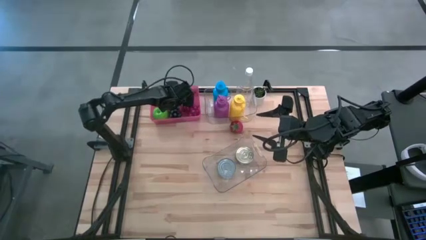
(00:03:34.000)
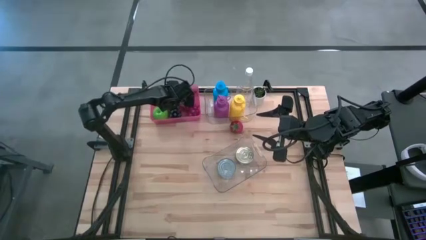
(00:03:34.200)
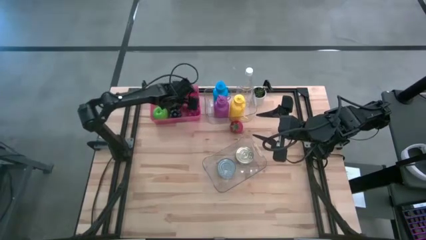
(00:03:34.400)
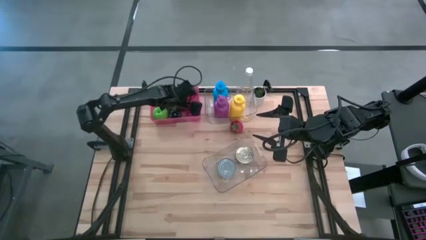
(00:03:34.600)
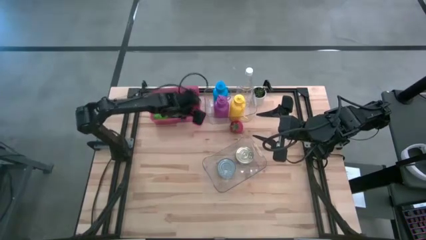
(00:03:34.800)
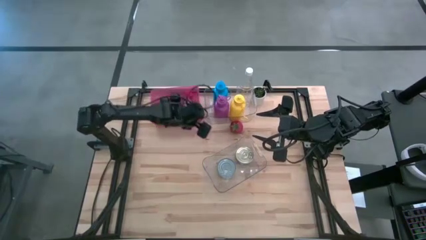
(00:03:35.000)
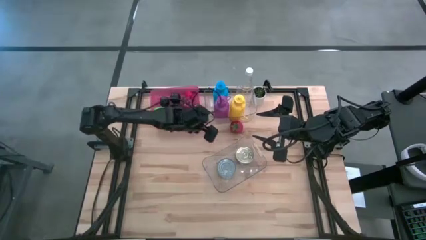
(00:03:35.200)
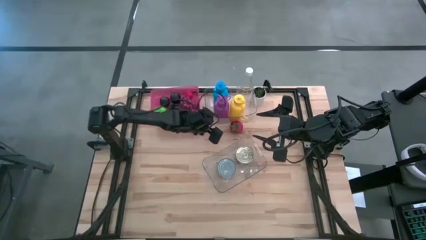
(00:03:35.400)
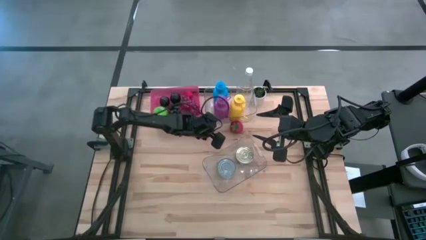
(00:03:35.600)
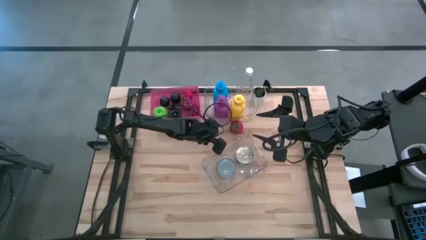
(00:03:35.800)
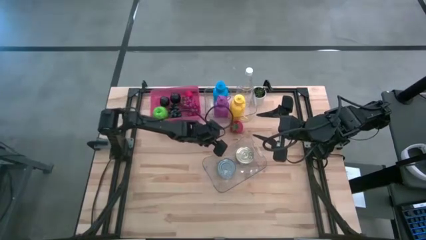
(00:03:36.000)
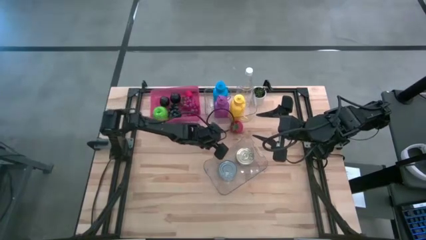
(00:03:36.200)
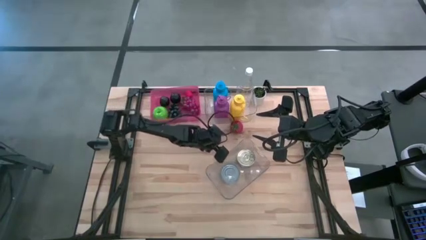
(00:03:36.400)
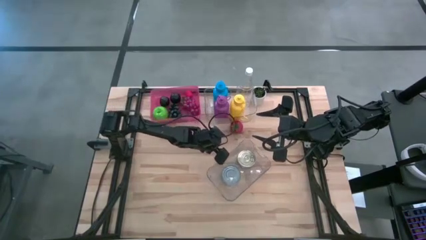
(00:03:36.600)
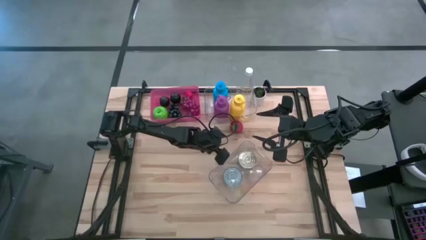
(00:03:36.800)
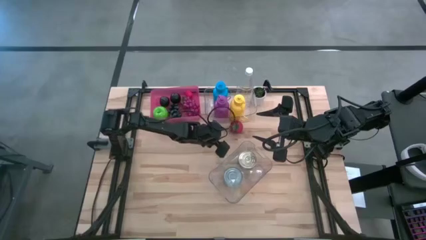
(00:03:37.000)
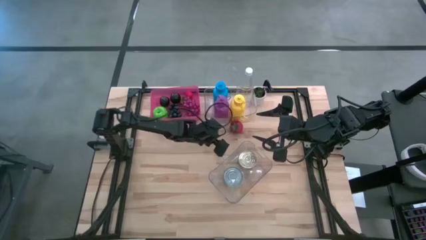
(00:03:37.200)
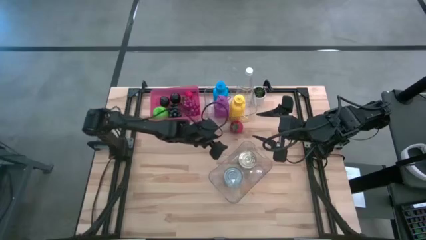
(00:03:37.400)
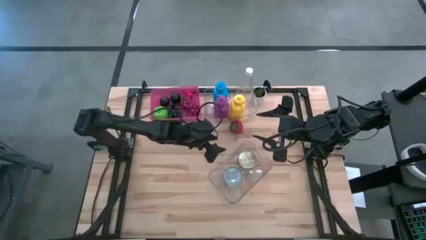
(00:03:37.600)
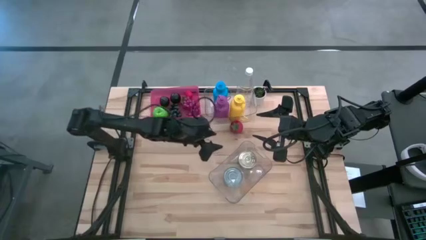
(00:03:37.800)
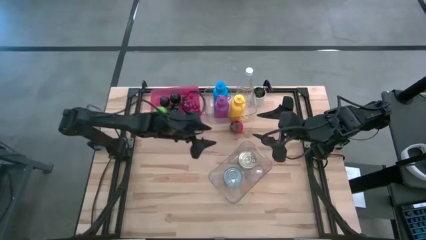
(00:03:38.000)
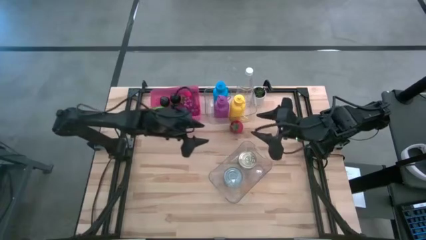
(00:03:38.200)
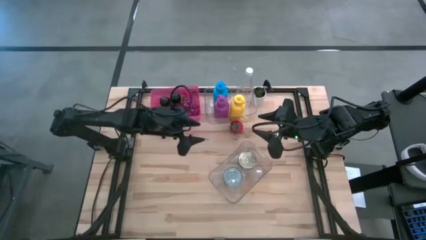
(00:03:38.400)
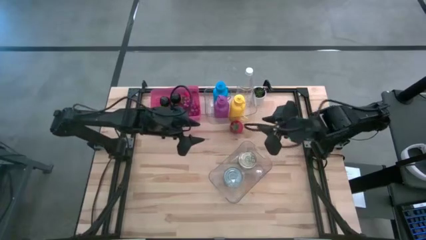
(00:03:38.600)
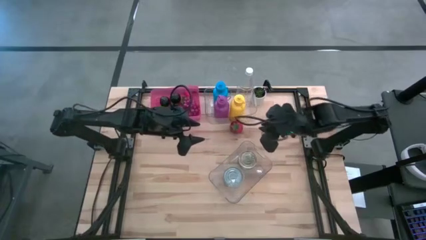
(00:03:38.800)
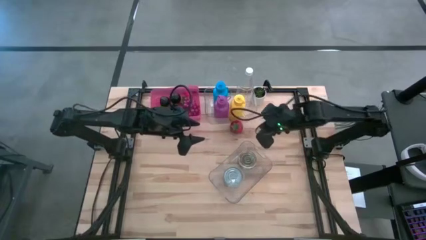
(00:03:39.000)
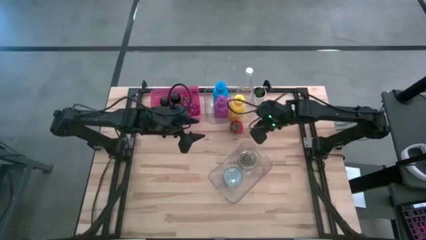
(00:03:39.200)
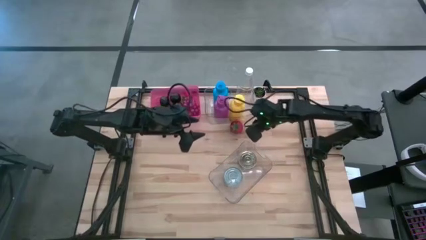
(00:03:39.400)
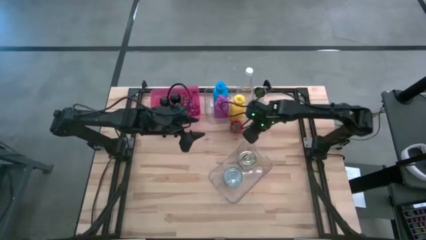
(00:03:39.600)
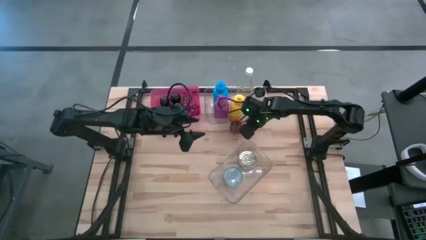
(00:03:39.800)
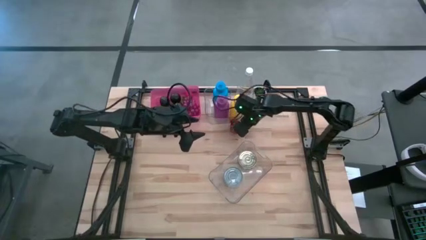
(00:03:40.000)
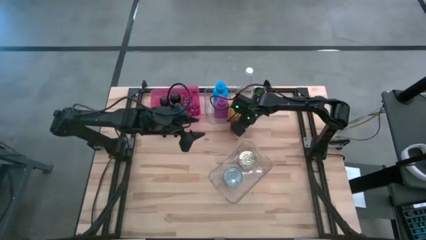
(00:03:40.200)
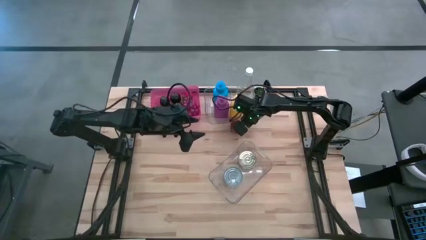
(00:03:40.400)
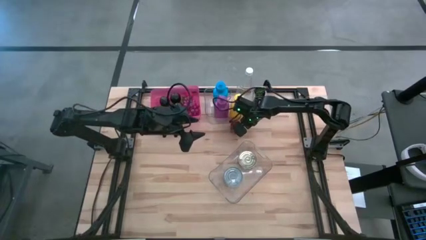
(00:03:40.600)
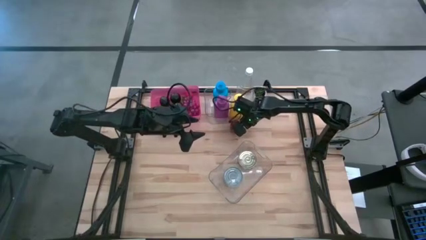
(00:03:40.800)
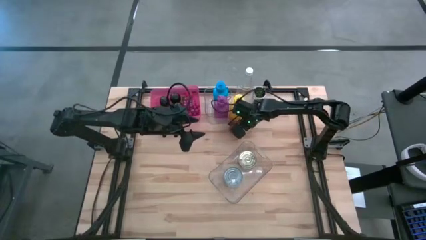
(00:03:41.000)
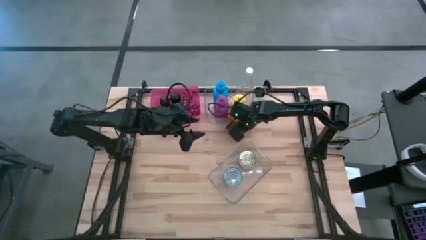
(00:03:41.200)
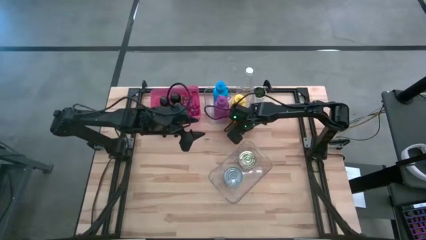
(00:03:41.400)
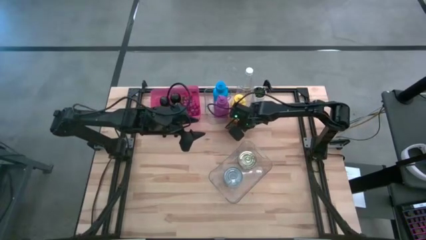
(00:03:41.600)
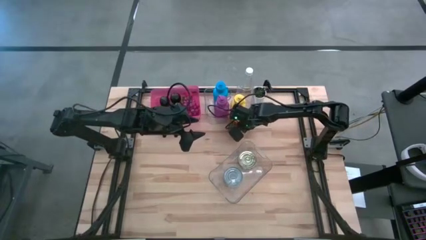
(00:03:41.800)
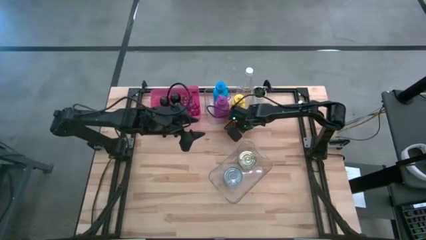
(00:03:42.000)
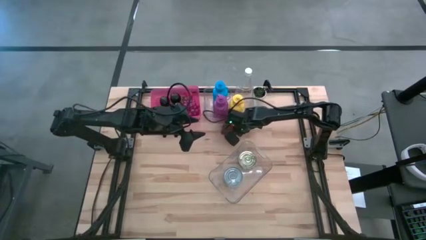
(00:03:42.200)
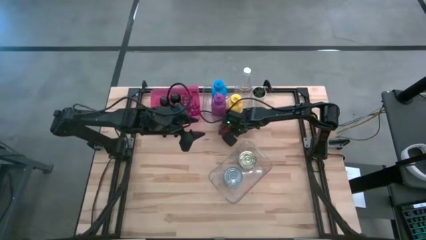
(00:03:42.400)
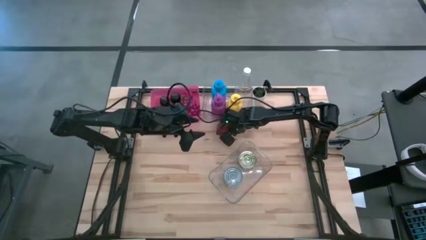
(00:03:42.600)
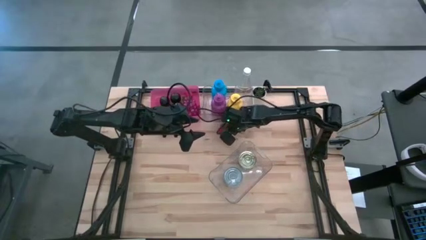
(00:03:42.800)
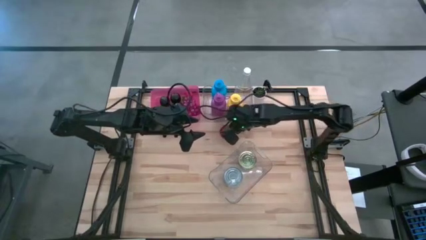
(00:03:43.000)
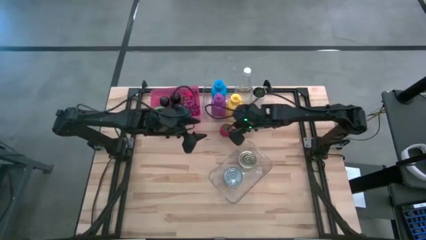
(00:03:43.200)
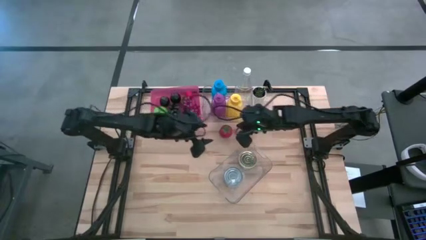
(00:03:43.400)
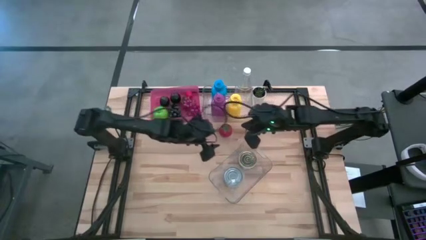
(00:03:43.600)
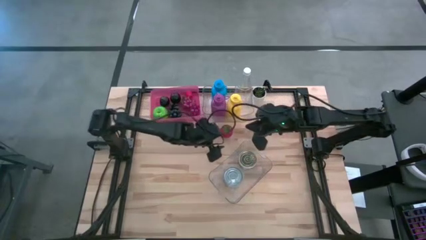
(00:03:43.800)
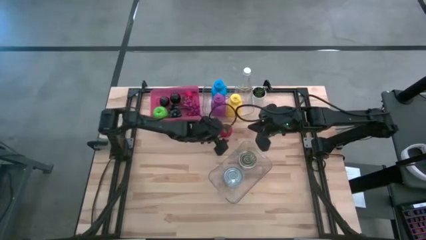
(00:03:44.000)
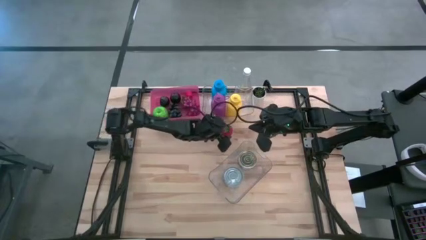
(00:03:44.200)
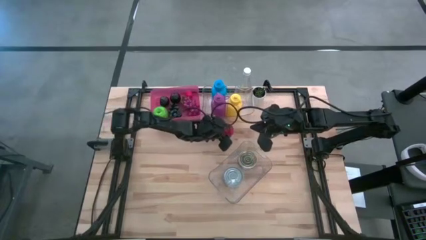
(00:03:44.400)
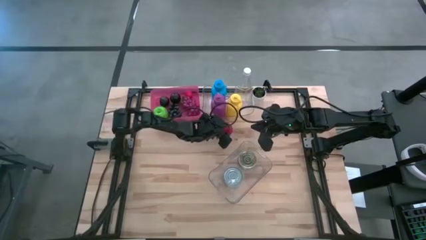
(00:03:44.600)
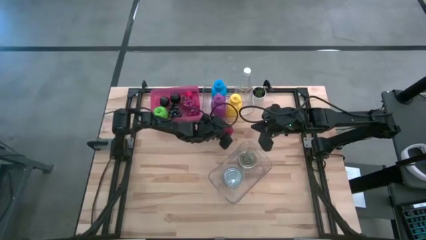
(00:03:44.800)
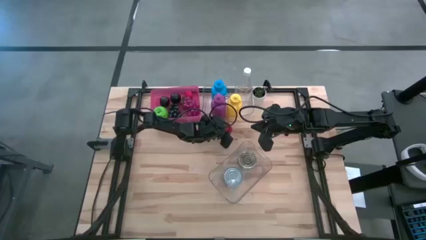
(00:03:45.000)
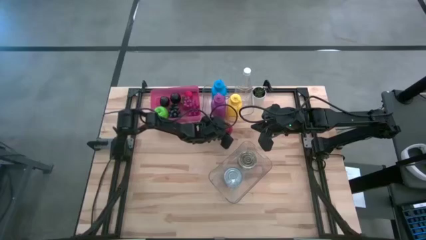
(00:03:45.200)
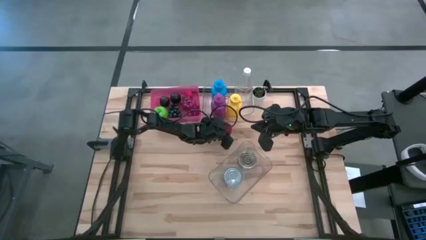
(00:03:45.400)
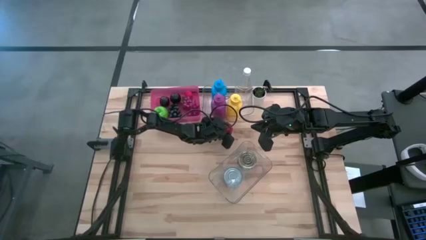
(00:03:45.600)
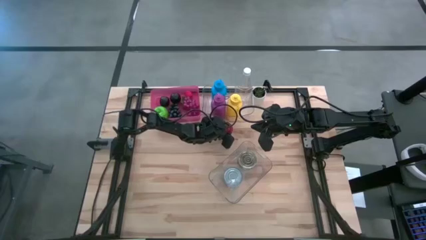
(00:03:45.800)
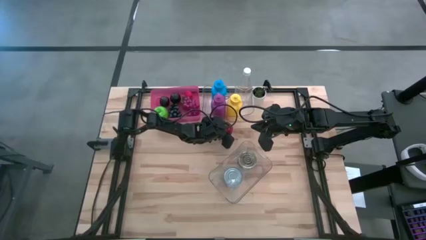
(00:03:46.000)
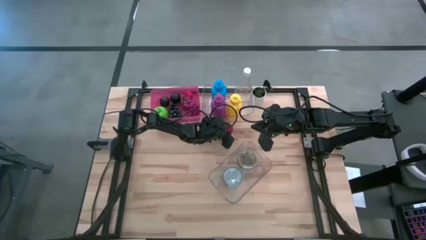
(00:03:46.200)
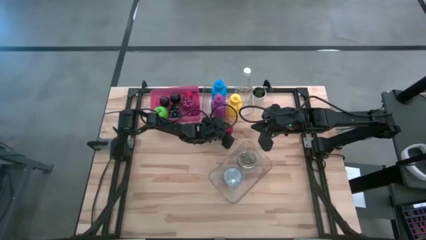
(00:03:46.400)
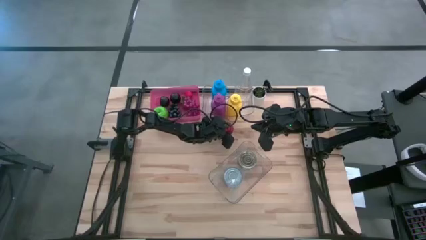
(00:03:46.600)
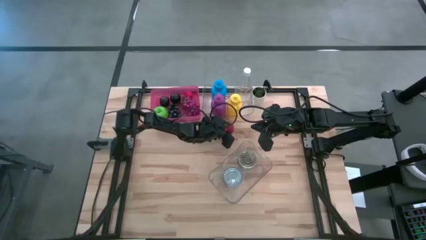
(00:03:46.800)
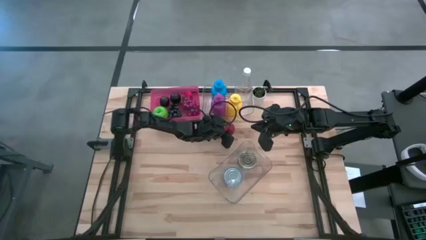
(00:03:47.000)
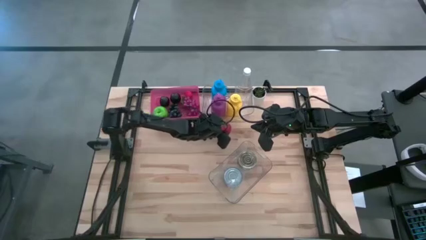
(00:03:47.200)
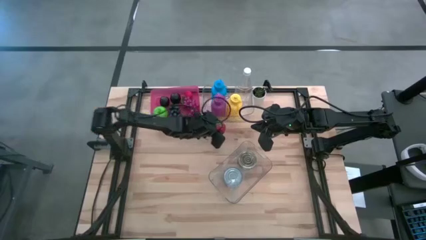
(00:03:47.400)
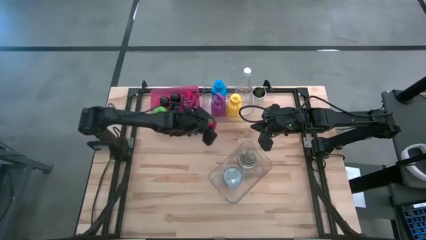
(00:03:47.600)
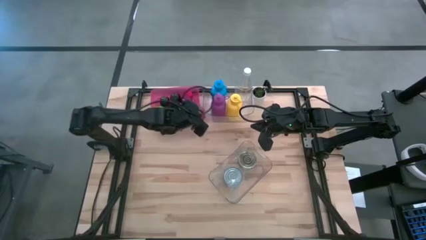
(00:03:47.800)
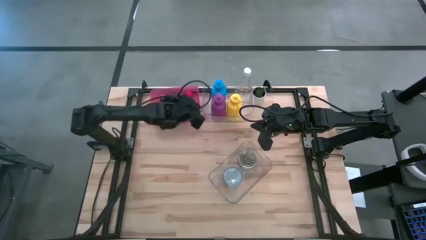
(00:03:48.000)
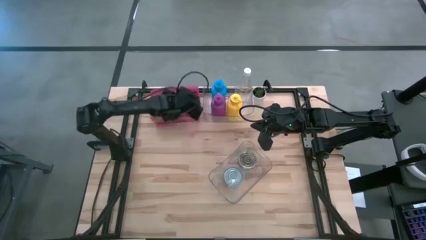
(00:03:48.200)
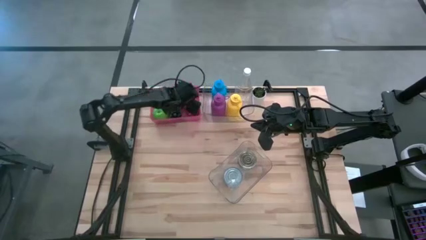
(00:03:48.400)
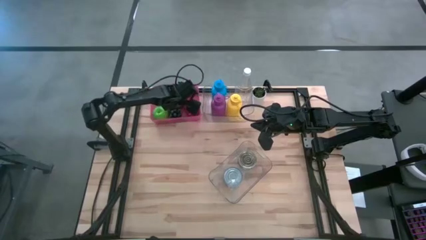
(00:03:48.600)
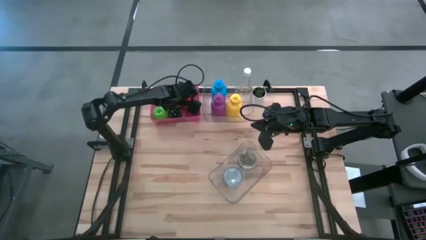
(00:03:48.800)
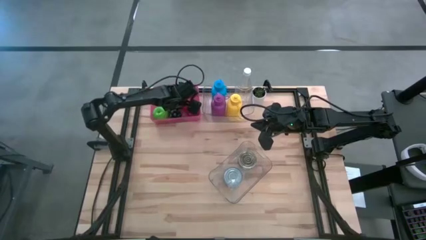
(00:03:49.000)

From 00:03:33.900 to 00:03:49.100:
Task: Pick & Place Food Item
Put the tomato into the pink bin
